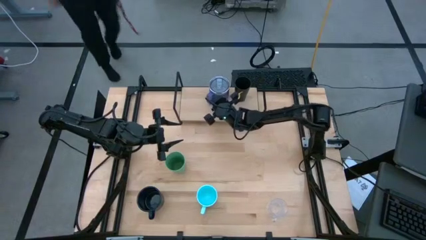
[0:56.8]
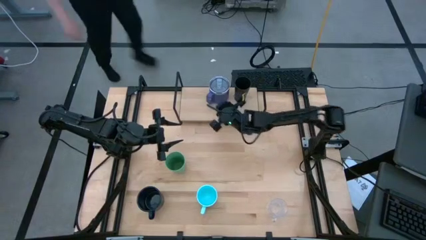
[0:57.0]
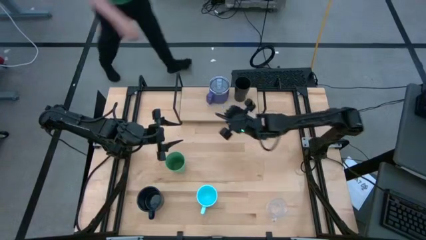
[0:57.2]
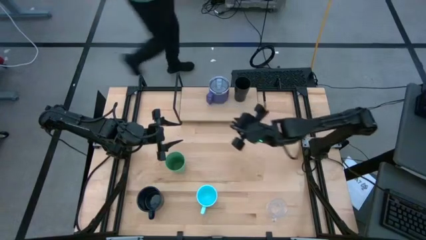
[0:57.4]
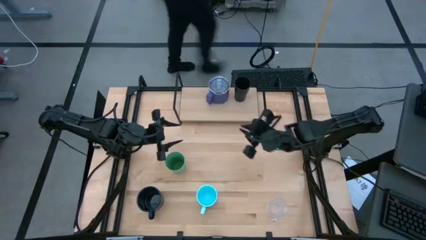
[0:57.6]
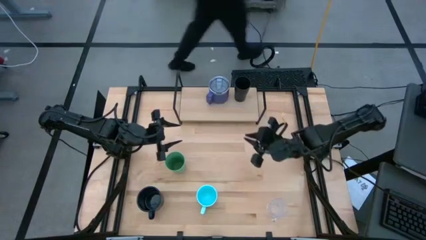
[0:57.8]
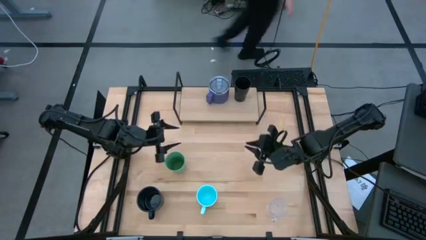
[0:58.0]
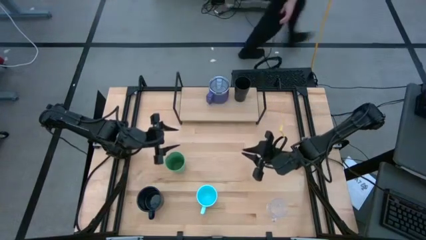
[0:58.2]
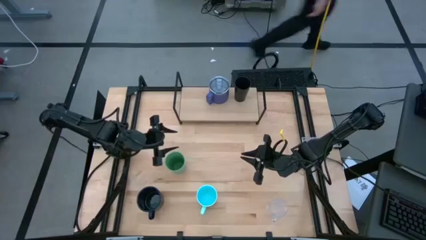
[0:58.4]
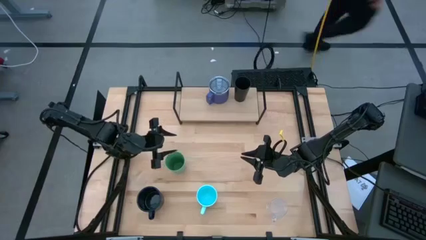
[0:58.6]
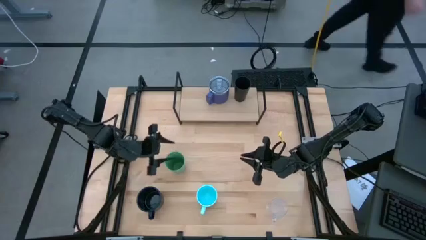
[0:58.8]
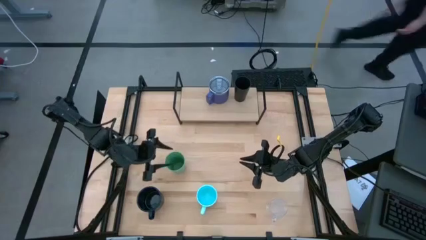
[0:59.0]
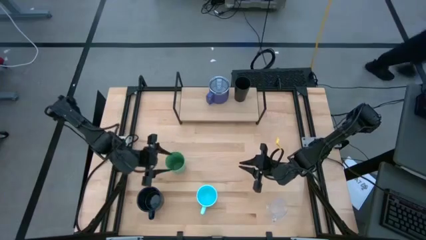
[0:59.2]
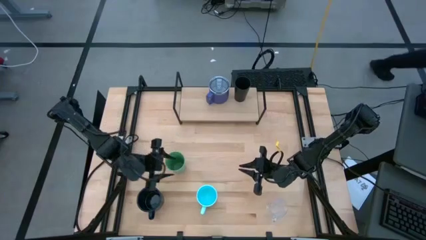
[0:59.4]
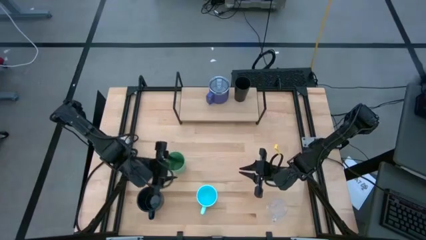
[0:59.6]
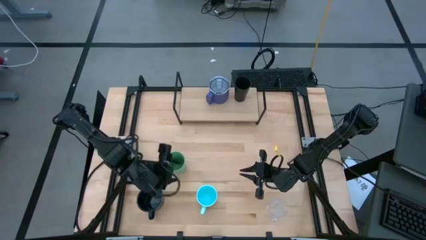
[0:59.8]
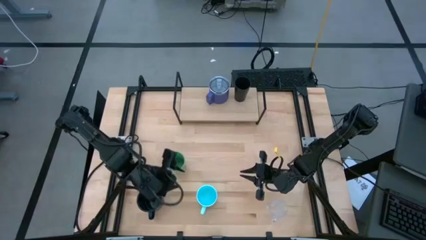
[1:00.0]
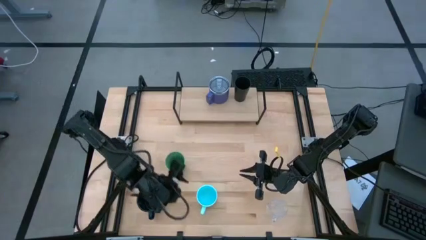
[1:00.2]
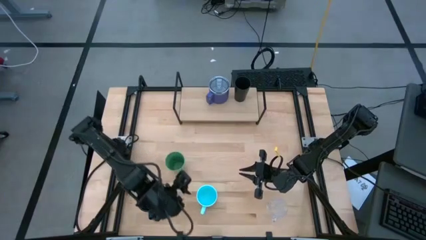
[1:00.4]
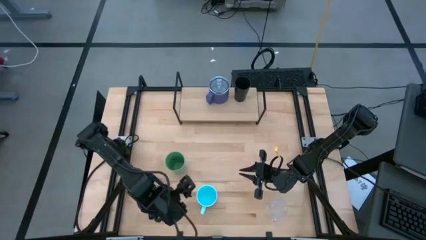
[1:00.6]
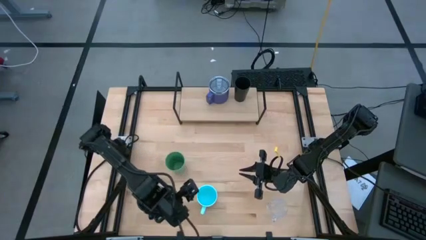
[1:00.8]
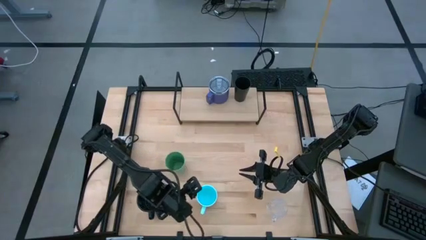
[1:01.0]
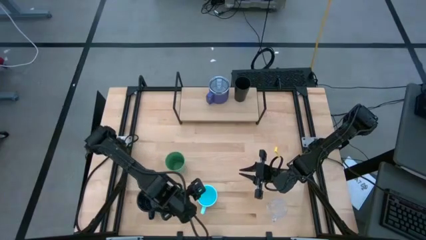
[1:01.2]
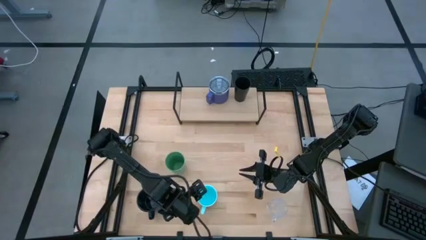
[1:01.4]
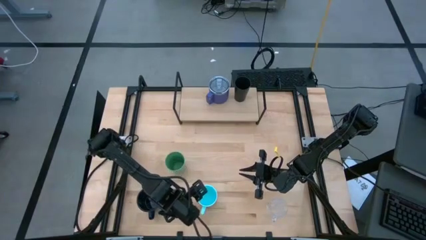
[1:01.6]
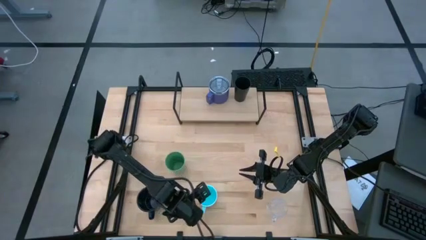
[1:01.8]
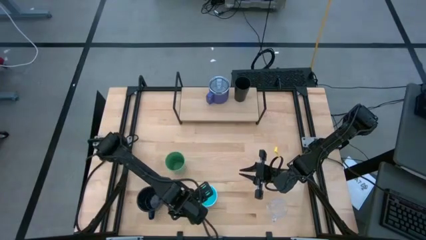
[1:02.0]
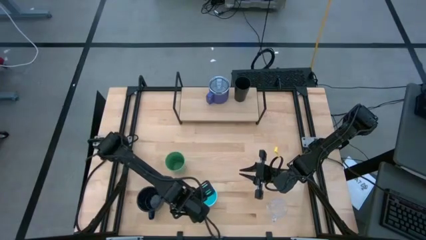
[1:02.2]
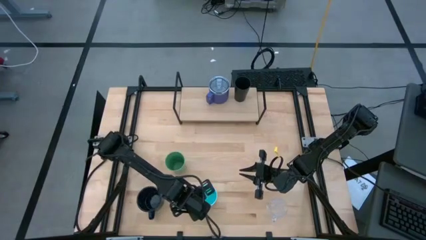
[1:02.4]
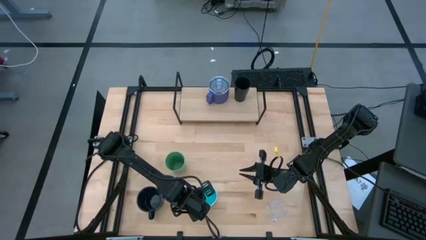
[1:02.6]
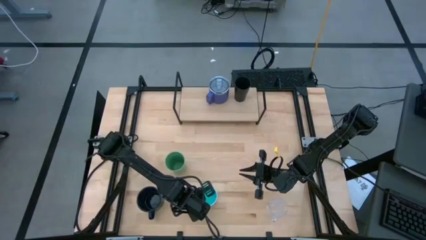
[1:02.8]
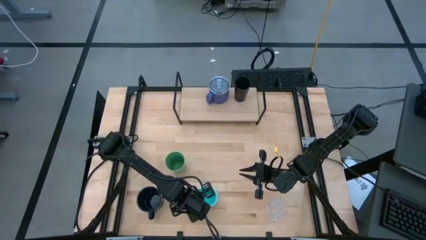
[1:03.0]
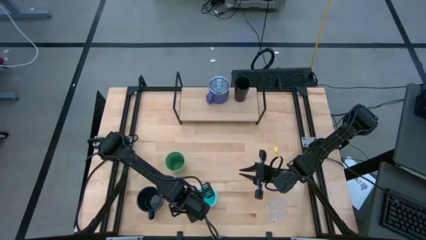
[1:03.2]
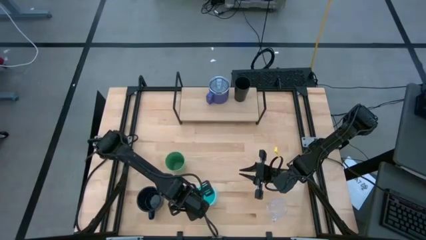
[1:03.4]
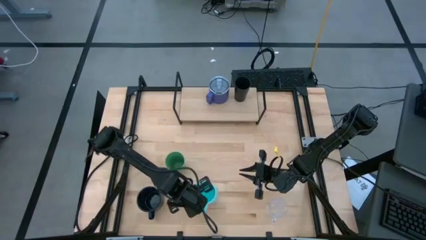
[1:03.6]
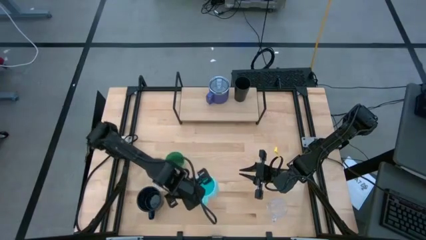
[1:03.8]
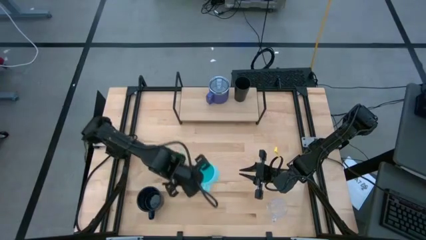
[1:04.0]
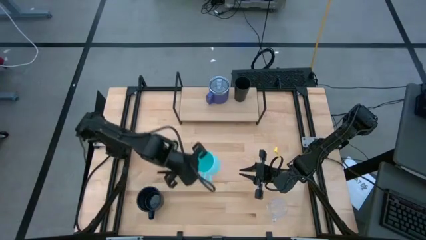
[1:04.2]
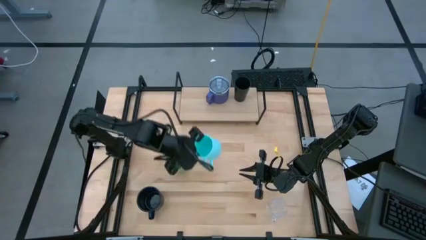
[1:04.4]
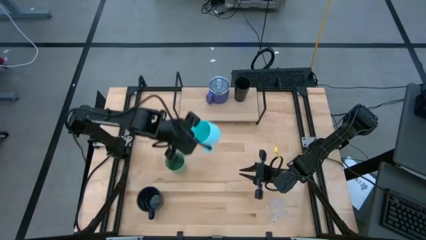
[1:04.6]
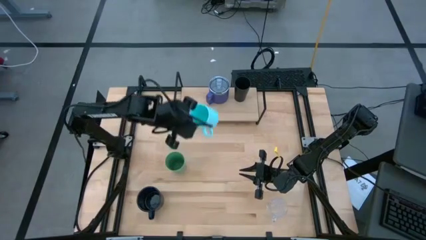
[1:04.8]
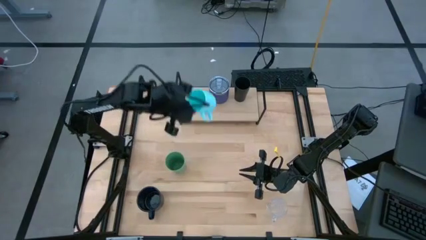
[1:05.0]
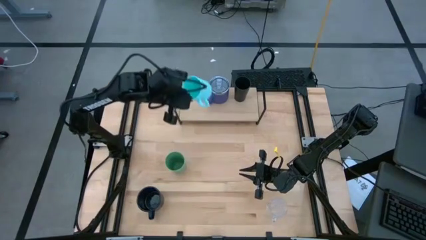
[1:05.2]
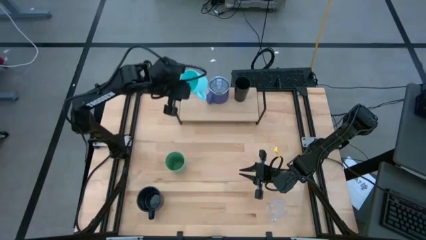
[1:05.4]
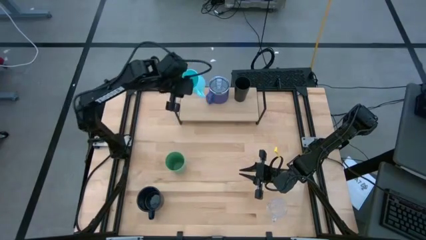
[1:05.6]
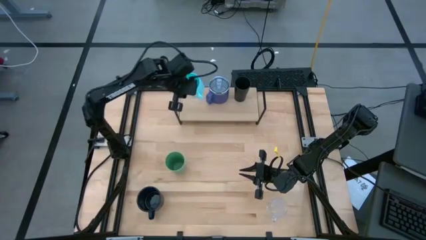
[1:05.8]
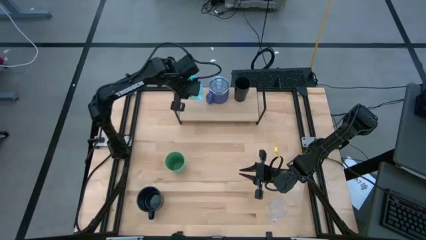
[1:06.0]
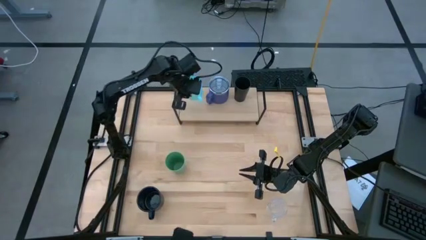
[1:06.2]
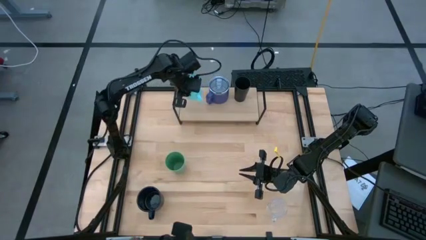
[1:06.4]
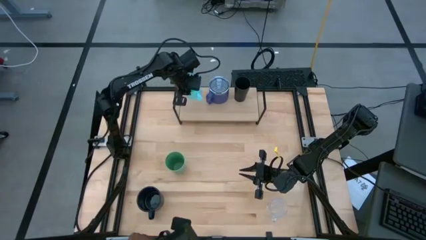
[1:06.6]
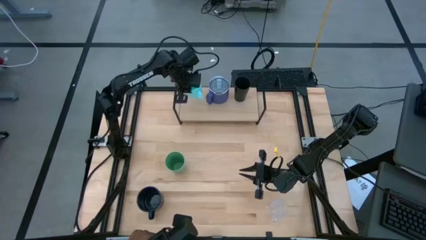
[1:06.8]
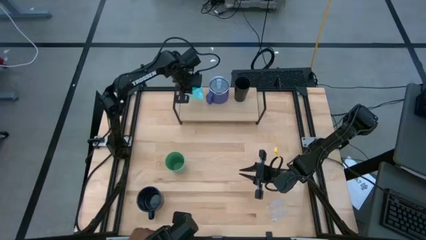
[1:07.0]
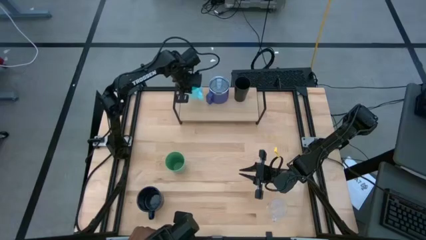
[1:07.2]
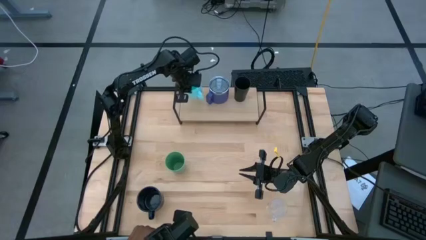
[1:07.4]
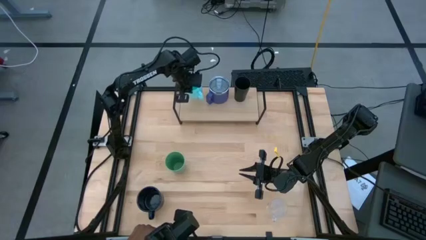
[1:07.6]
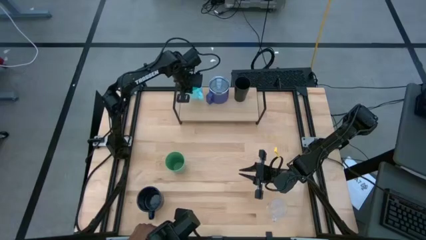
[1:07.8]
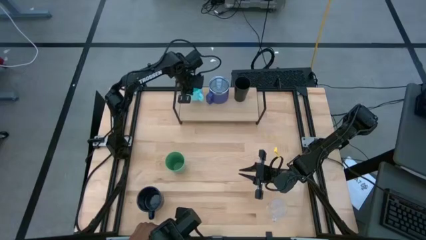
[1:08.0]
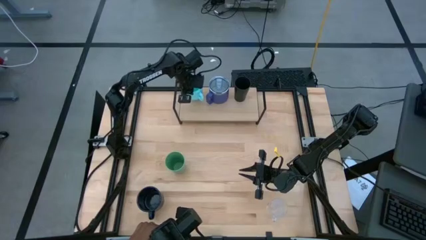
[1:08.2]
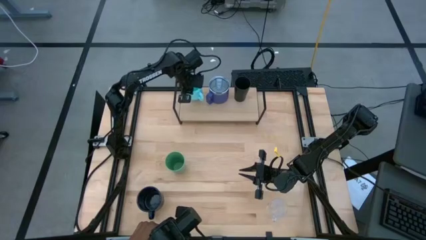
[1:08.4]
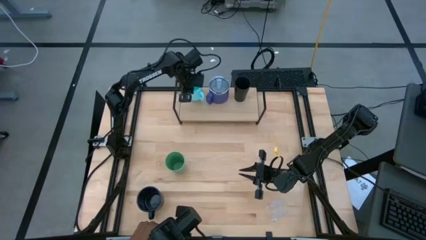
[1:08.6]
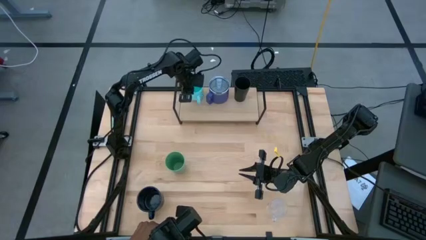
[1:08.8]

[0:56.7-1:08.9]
Task: Stack small to large cups/mugs on shelf
Put the light blue mug on the shelf

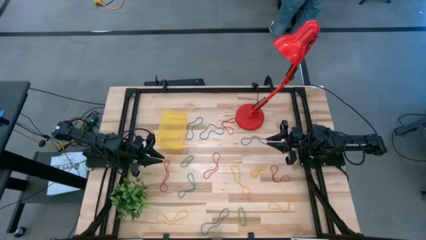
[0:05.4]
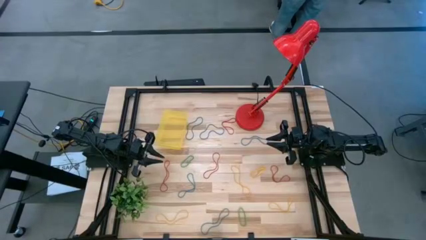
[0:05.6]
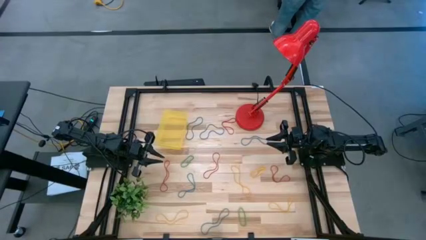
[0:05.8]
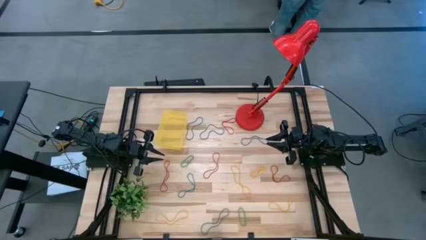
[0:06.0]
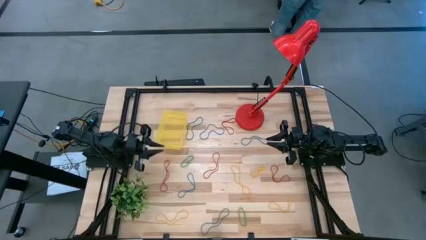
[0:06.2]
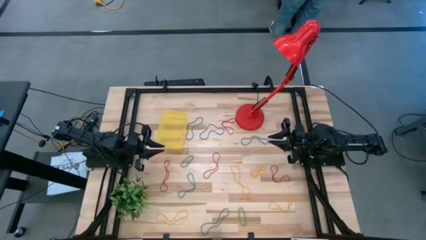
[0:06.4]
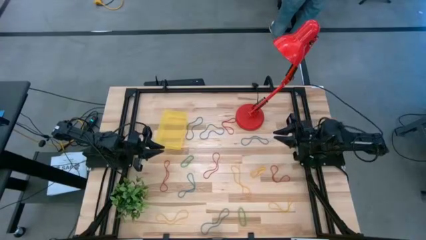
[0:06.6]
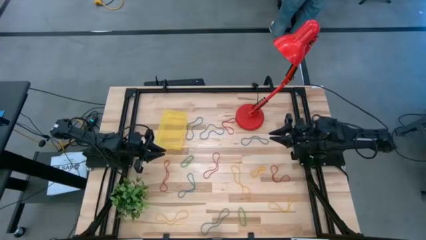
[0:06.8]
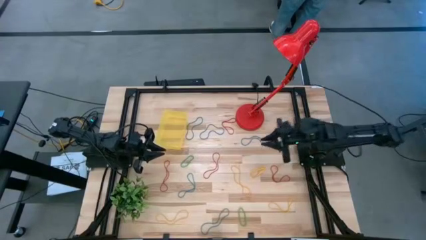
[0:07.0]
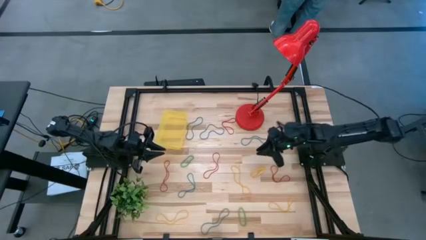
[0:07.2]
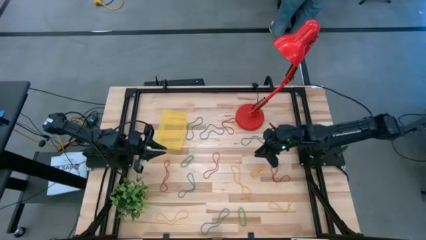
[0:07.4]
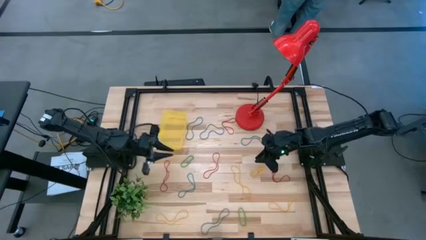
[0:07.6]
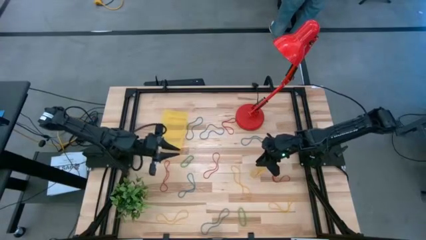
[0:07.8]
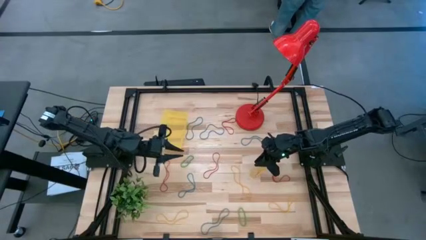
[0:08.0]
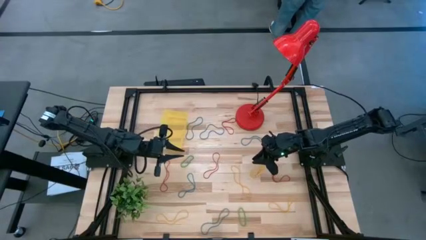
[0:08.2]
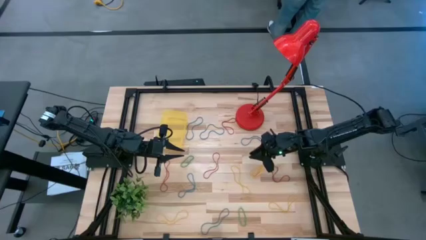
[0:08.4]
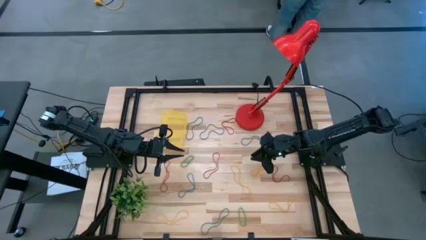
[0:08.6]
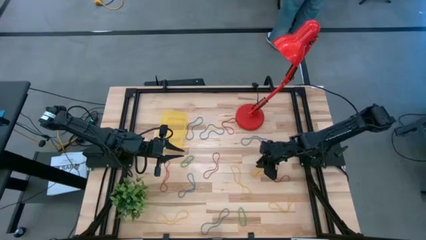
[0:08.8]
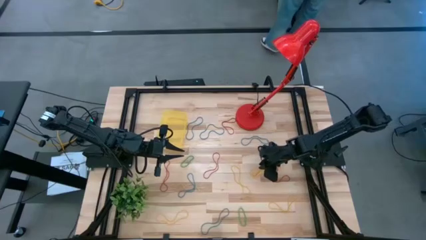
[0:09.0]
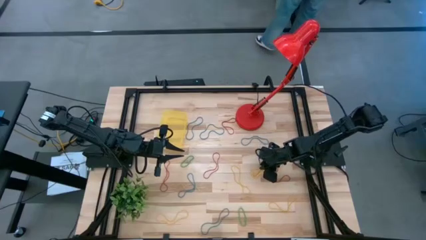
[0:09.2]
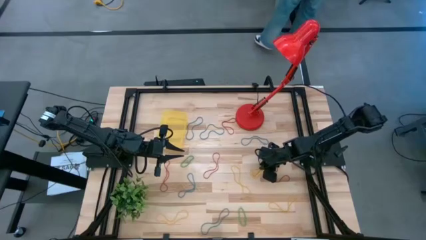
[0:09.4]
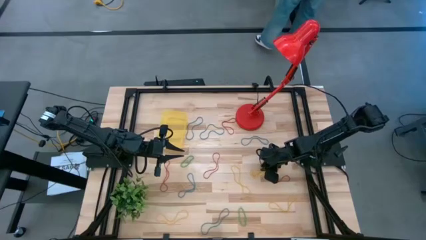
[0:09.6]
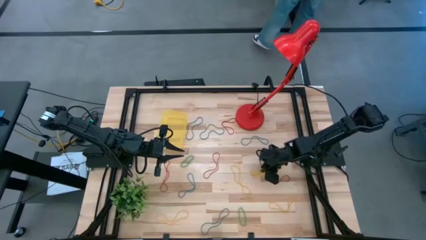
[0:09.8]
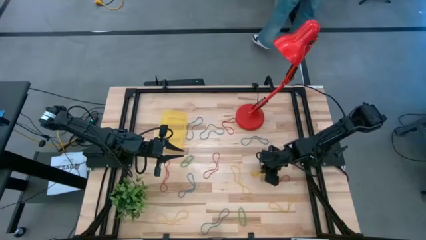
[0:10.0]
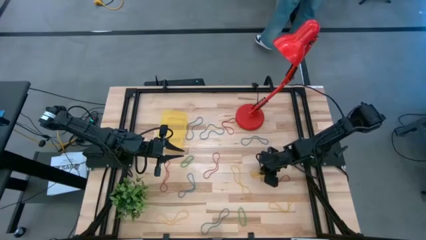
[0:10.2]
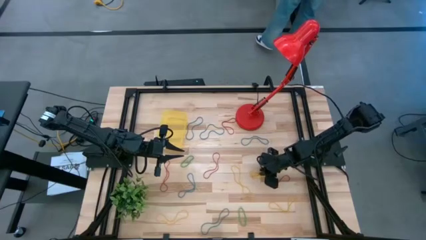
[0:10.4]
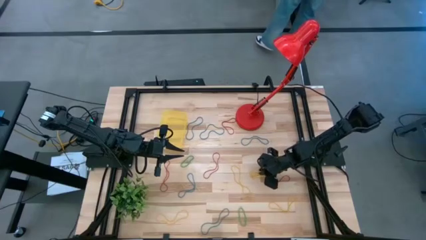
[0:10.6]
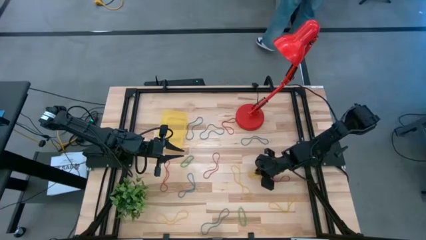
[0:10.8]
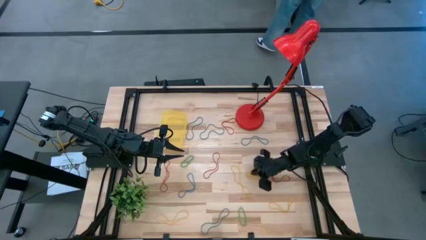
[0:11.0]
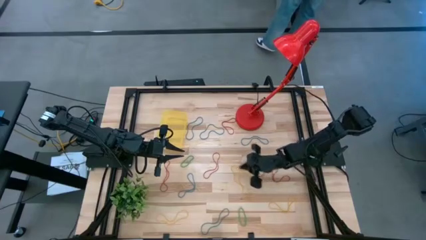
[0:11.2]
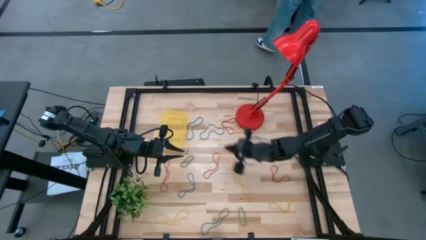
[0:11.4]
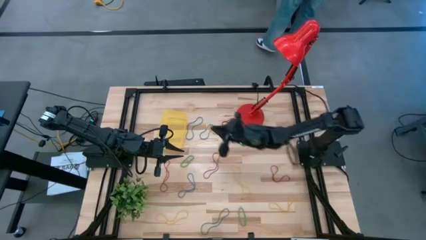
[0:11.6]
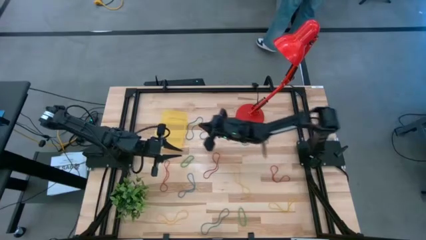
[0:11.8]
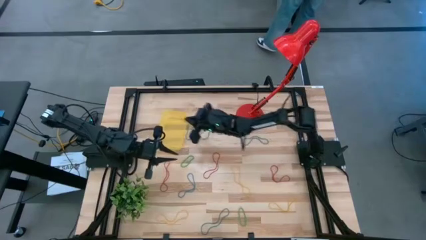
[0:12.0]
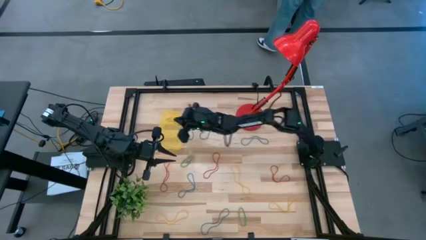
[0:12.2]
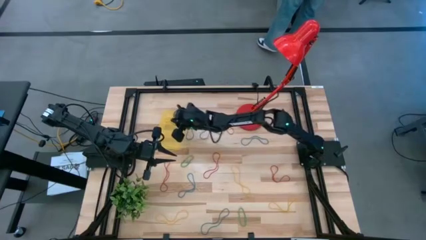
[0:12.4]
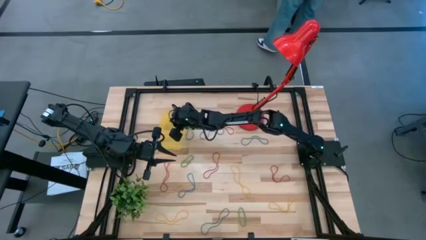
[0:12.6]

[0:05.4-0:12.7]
Task: Pick and place items into bin
Put the yellow rubber band into the yellow bin
